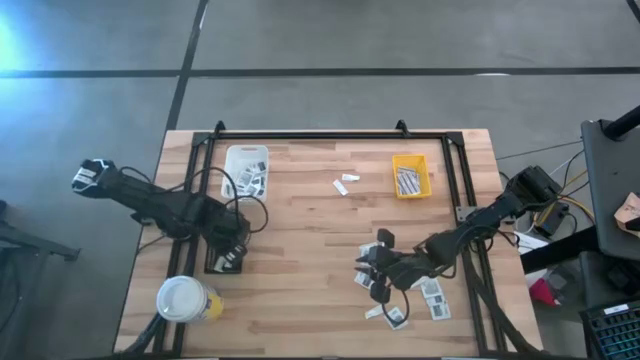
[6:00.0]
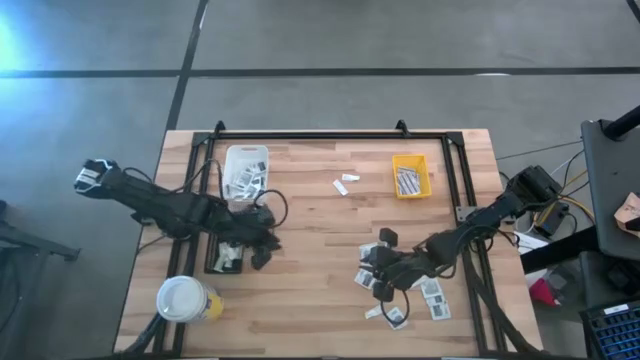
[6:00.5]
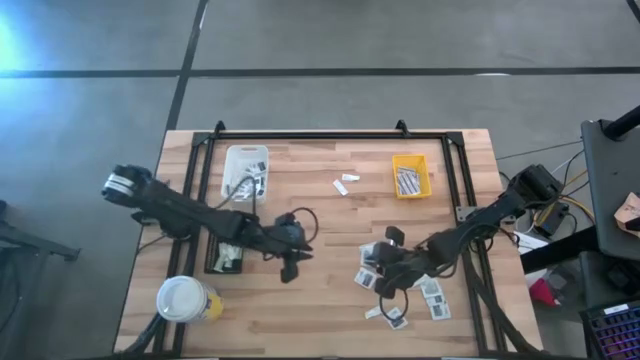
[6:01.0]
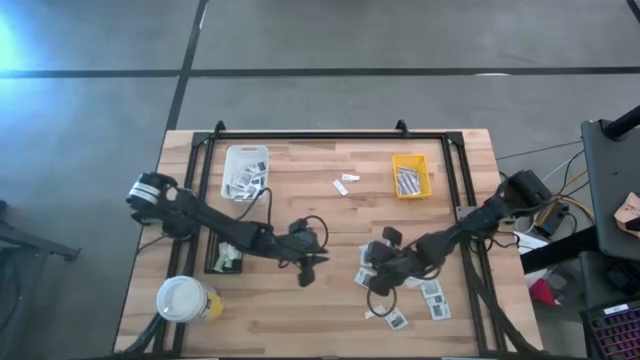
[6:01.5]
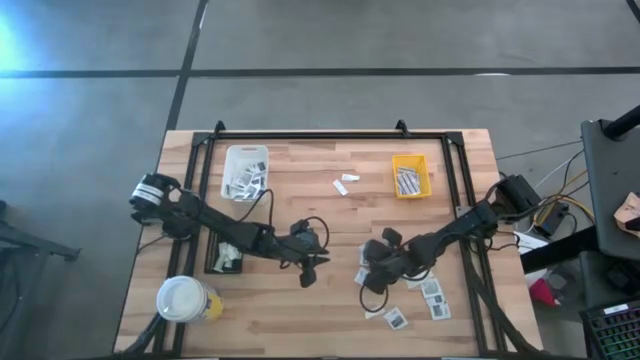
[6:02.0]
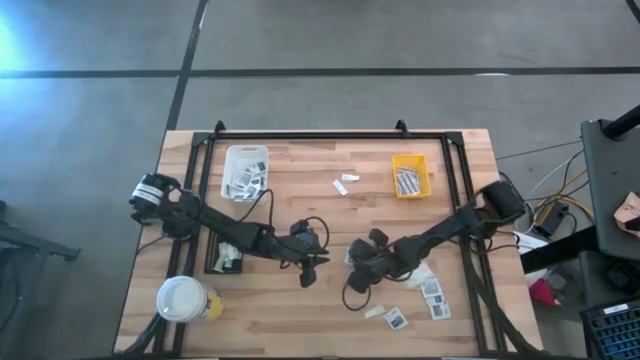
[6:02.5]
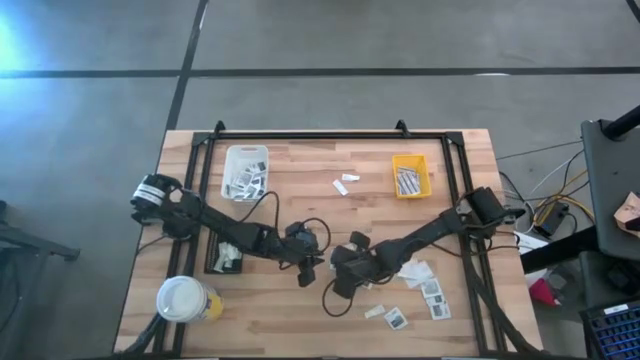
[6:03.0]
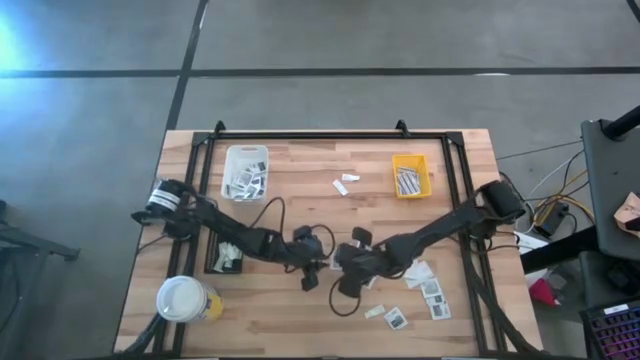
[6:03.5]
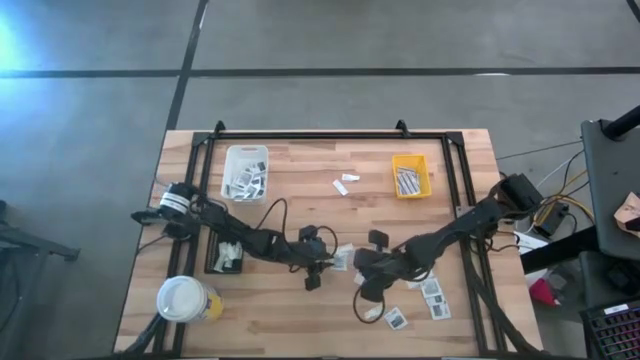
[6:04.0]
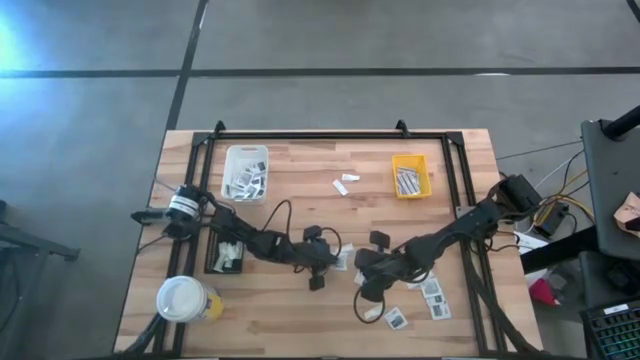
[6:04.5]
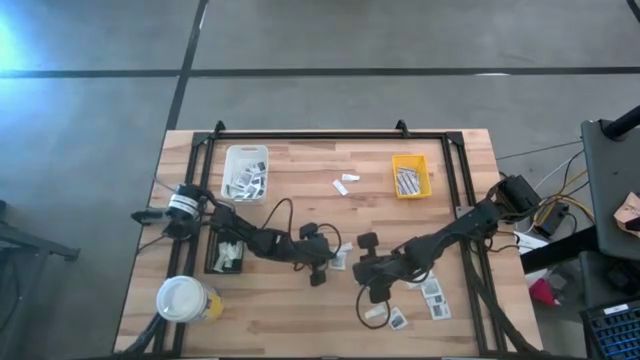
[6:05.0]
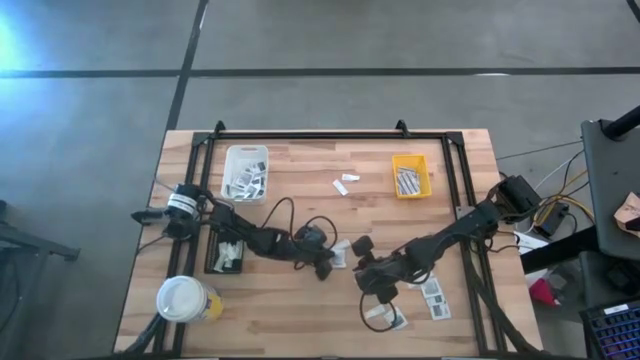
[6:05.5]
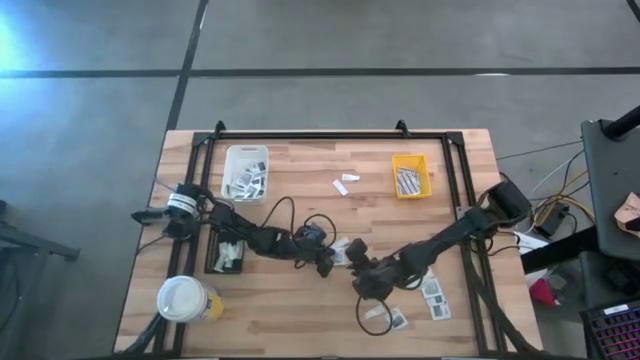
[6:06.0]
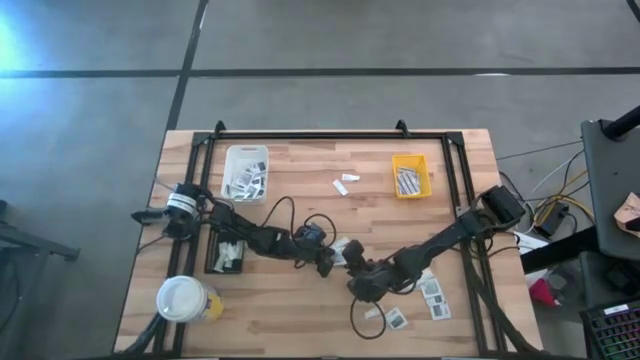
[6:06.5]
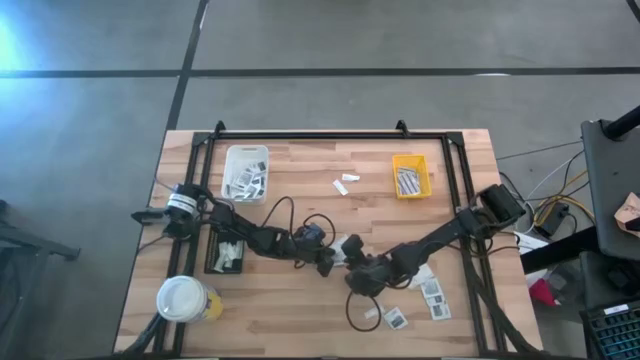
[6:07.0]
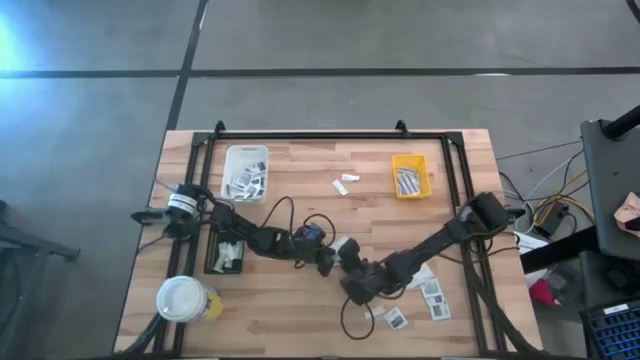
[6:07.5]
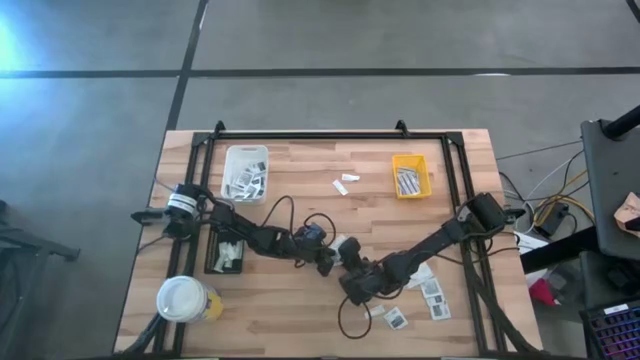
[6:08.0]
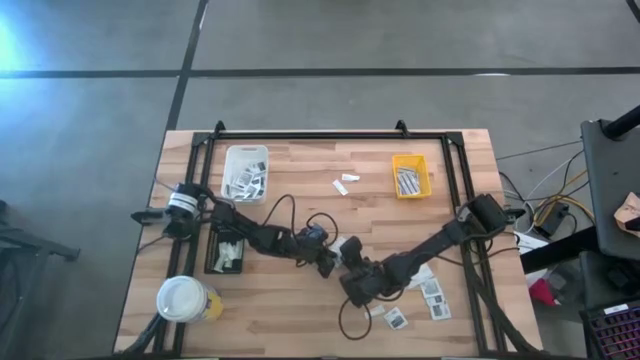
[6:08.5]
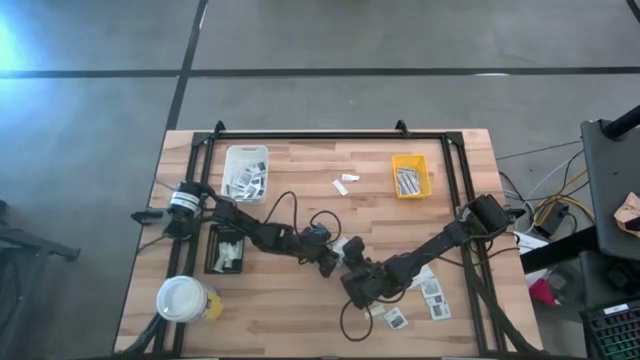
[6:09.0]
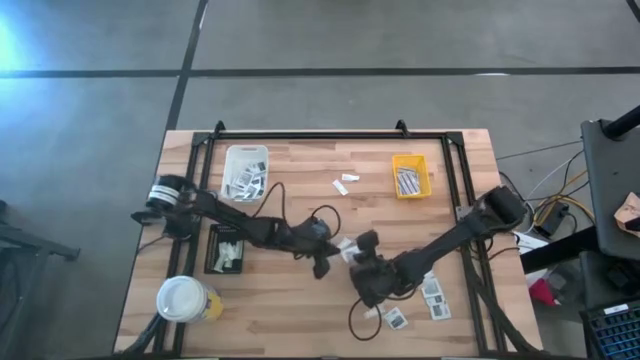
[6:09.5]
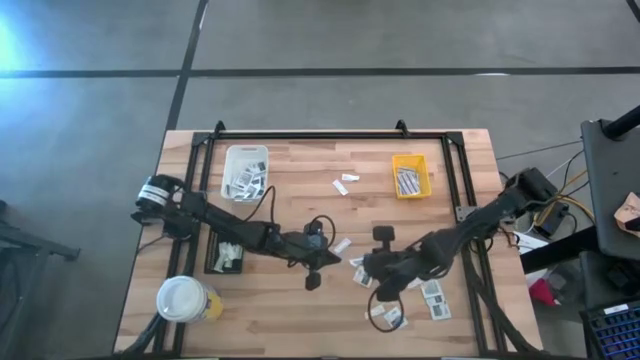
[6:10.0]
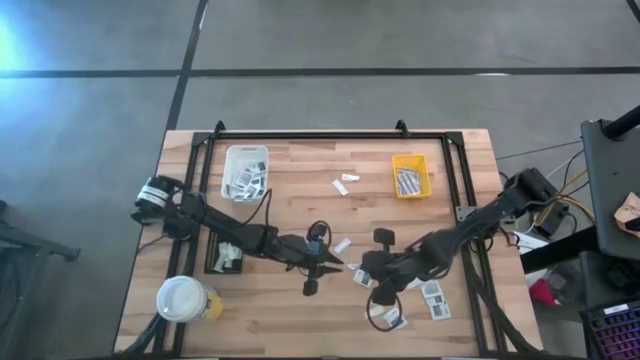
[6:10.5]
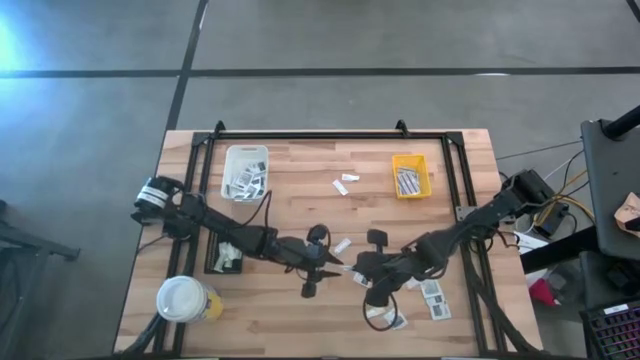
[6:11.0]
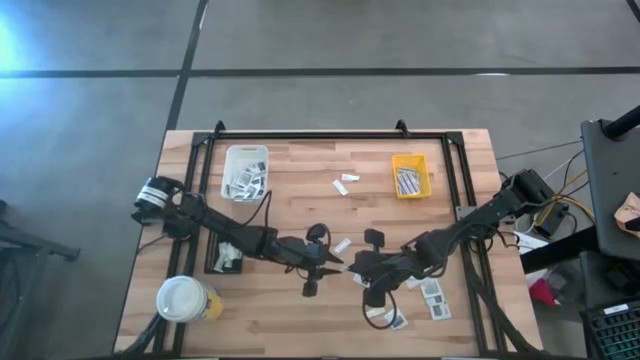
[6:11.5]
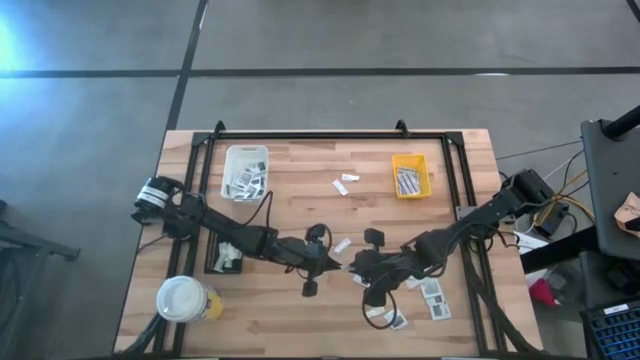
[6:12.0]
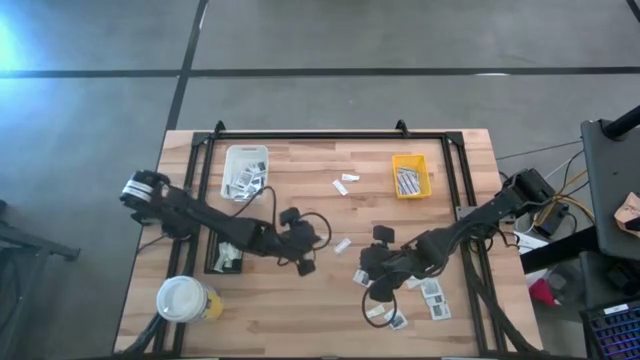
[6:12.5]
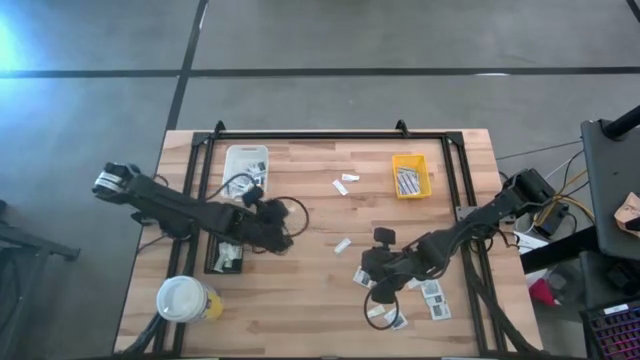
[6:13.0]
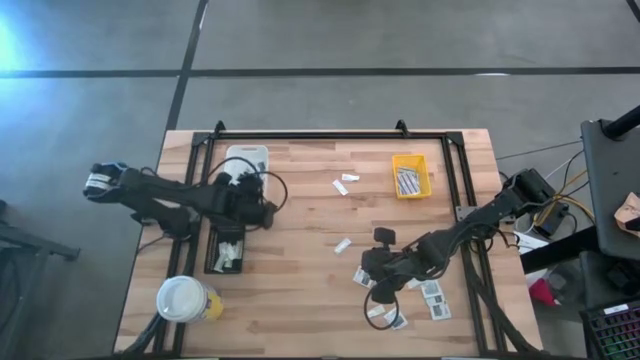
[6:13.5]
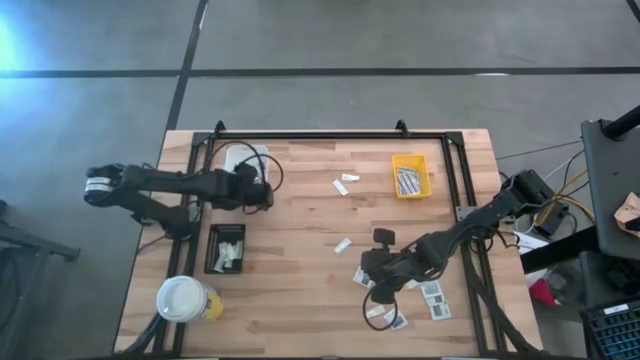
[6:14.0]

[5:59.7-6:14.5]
Task: Pick & Place First Aid Supplies
Put the gray towelette pack into the white bin

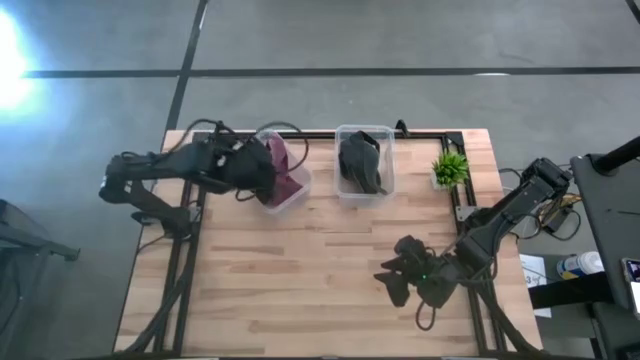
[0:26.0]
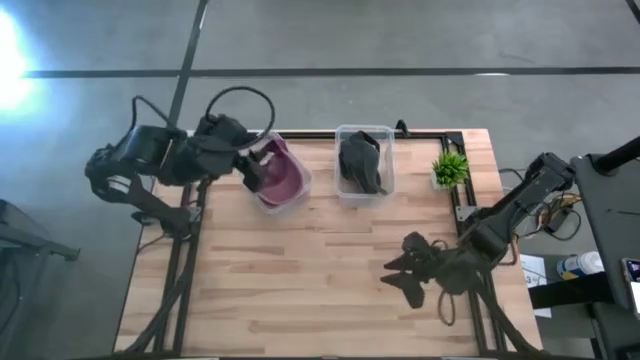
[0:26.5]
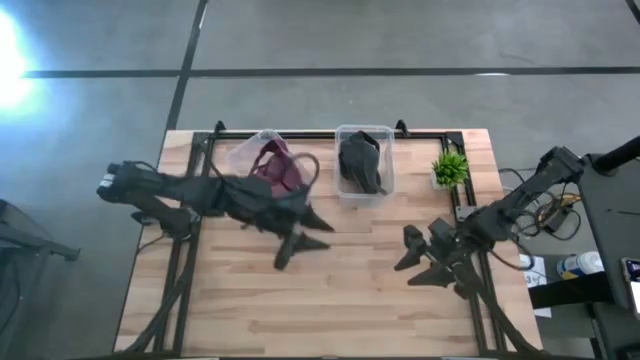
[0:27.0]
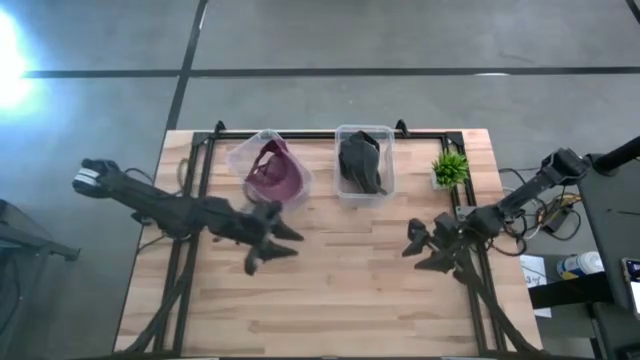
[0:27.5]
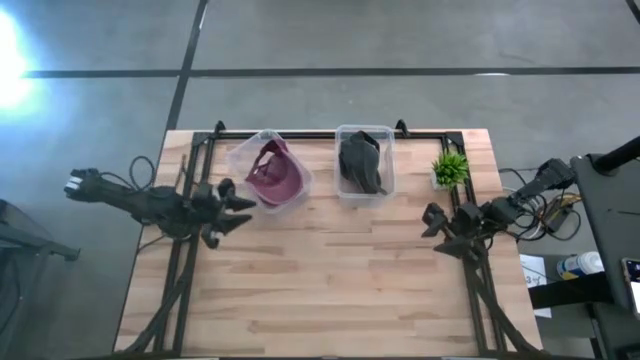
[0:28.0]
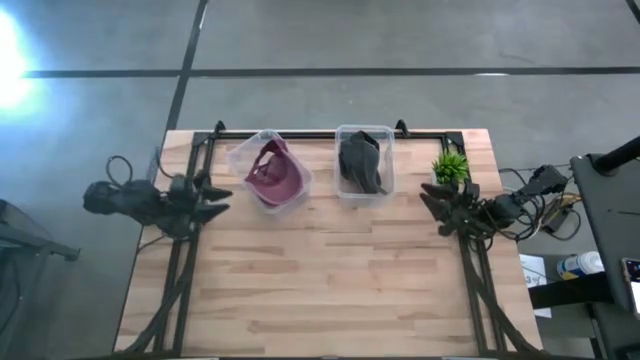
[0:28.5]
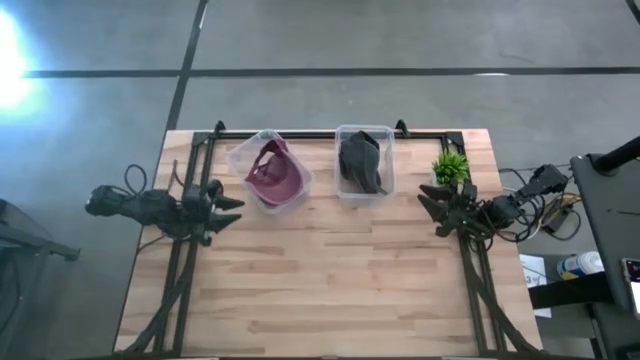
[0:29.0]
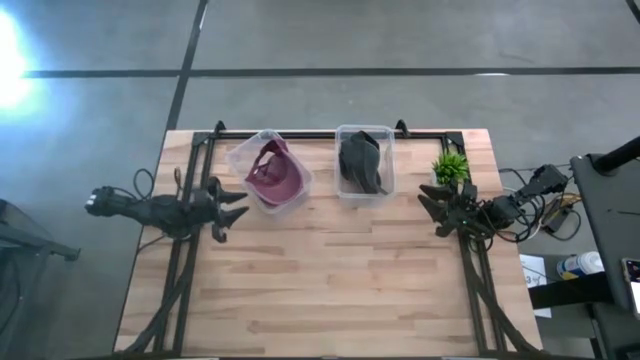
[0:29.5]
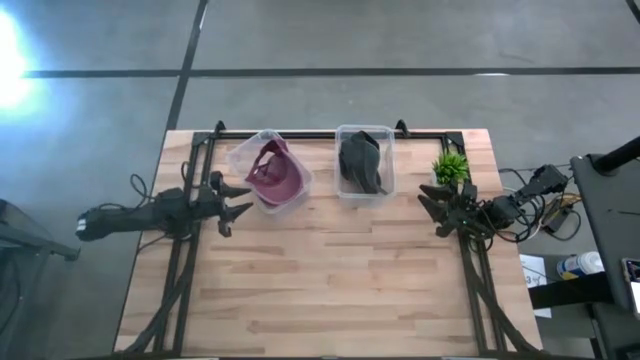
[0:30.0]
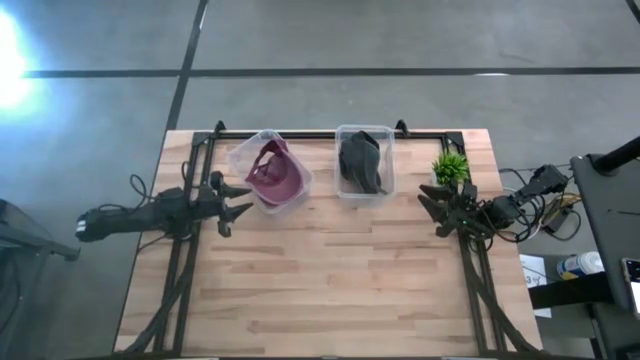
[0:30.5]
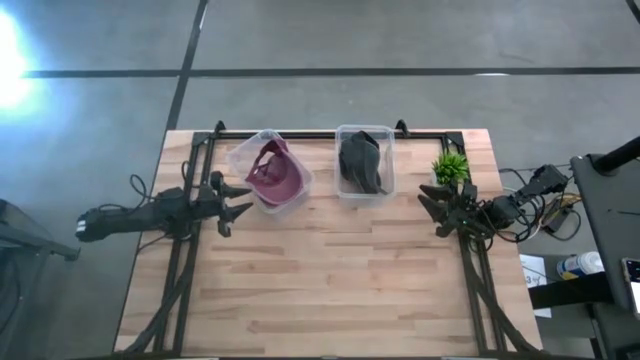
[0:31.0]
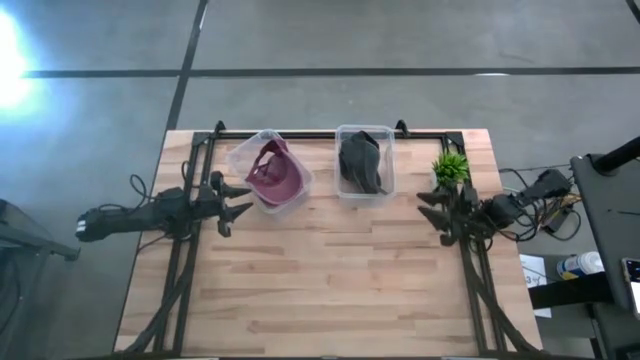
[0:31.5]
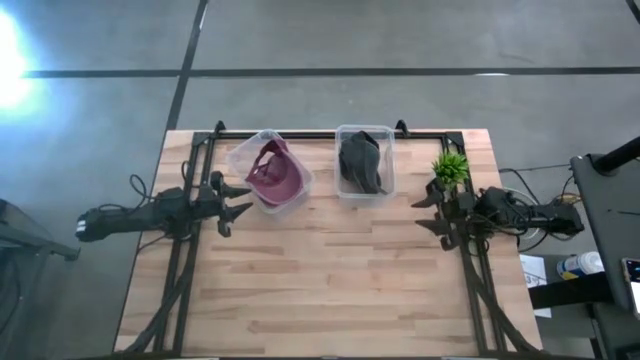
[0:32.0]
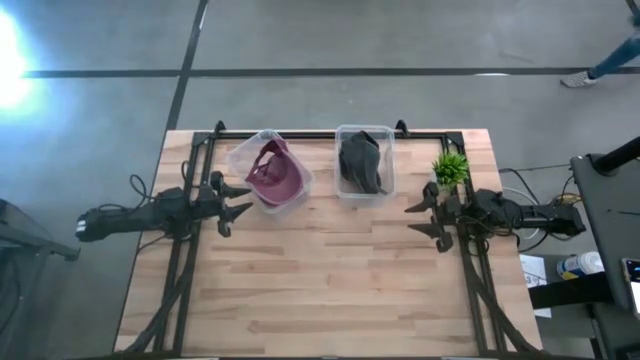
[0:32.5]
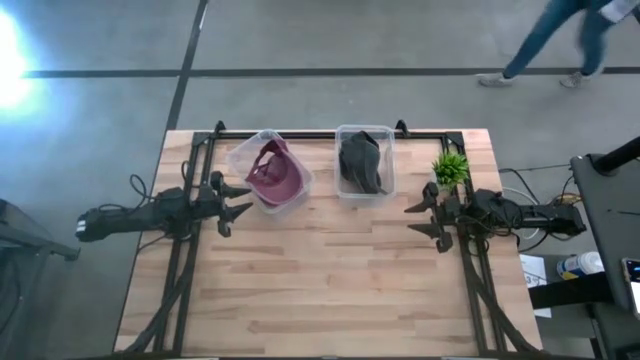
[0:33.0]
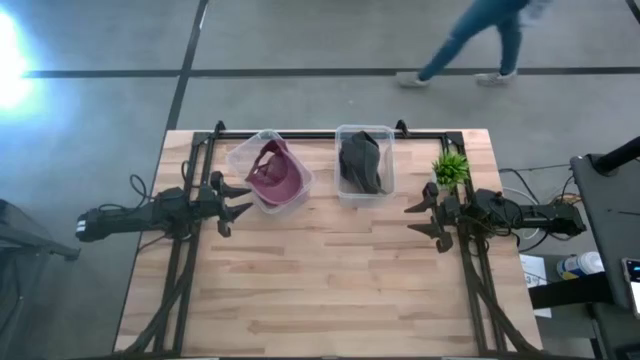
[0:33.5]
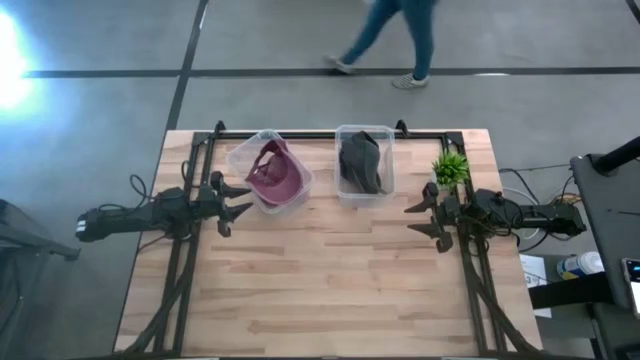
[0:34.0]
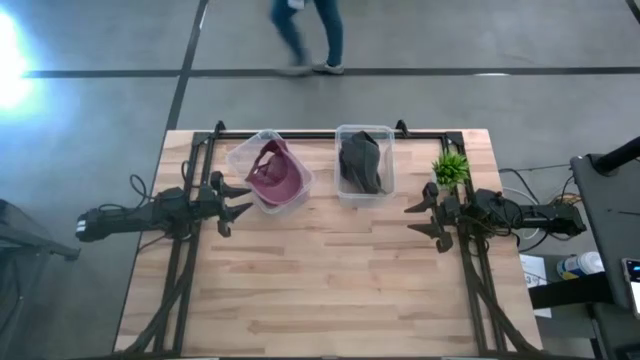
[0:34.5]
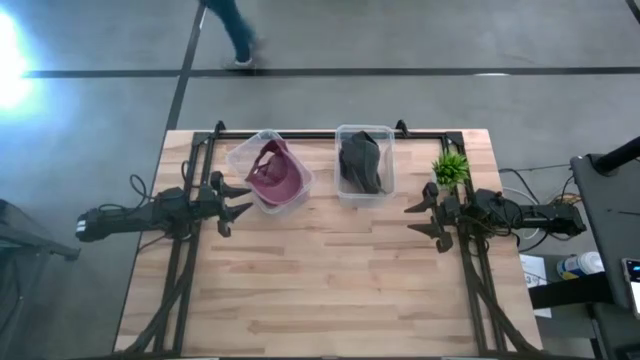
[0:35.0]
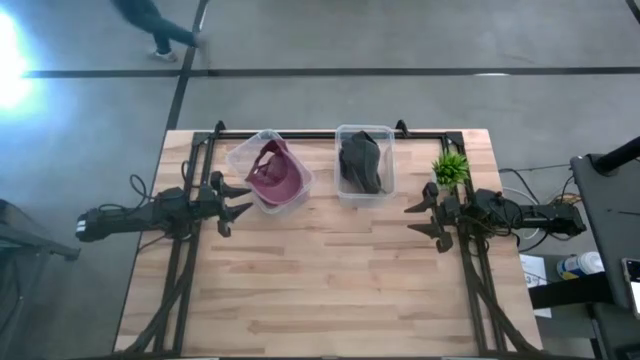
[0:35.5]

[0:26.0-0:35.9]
Task: Pick & Place hat
Return to Home Position
